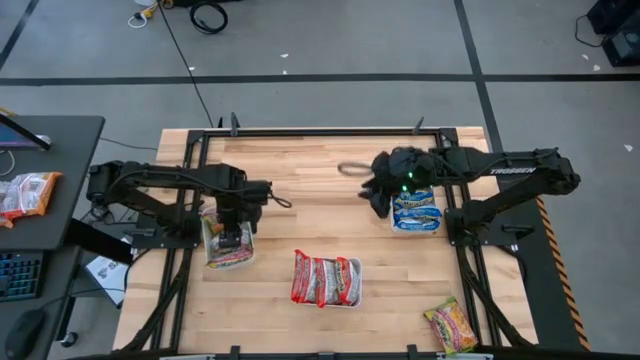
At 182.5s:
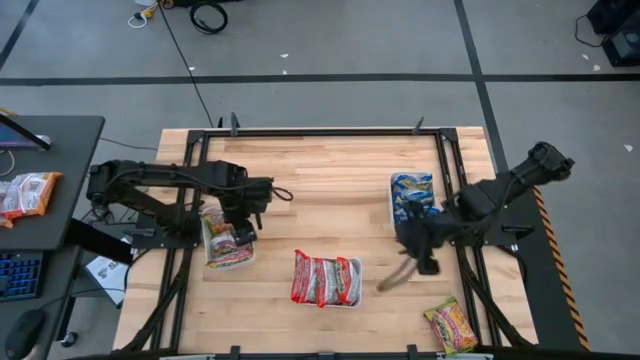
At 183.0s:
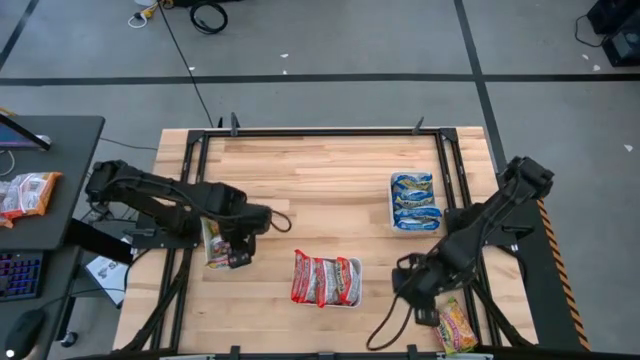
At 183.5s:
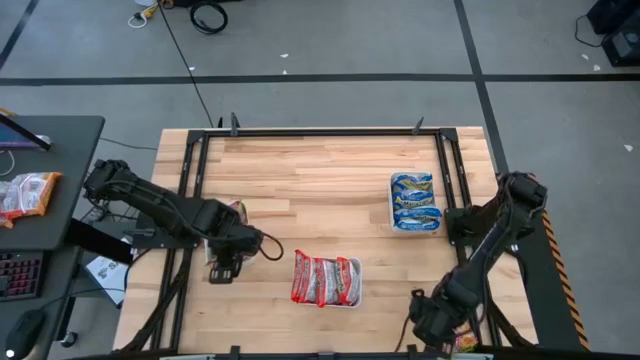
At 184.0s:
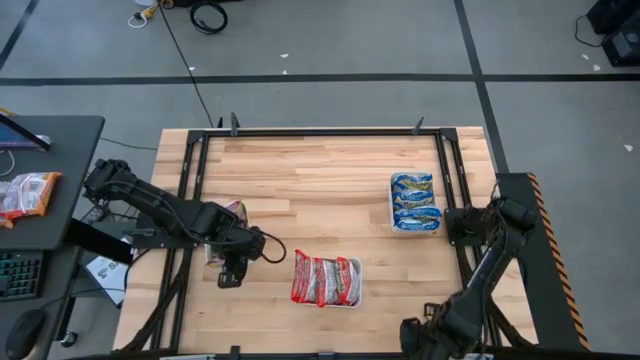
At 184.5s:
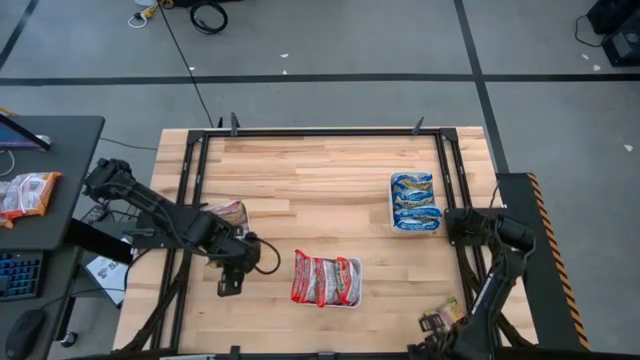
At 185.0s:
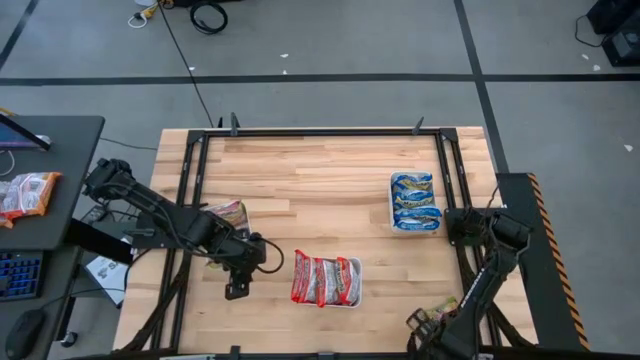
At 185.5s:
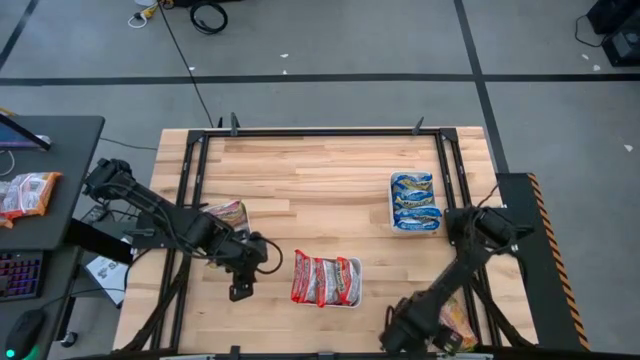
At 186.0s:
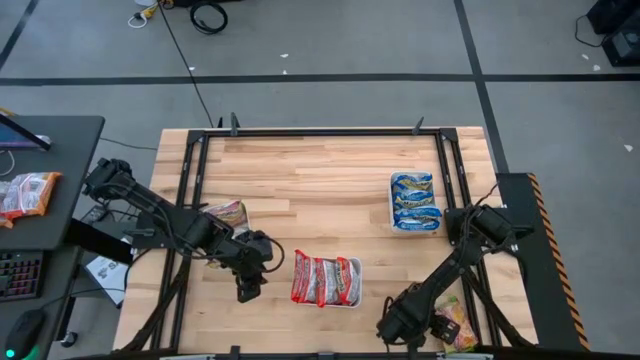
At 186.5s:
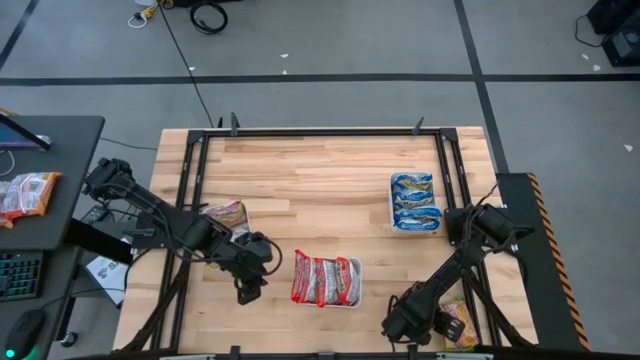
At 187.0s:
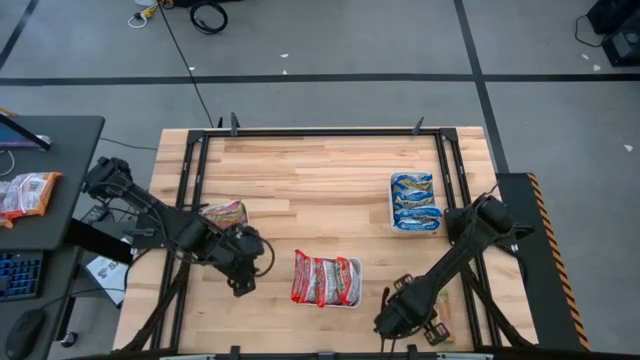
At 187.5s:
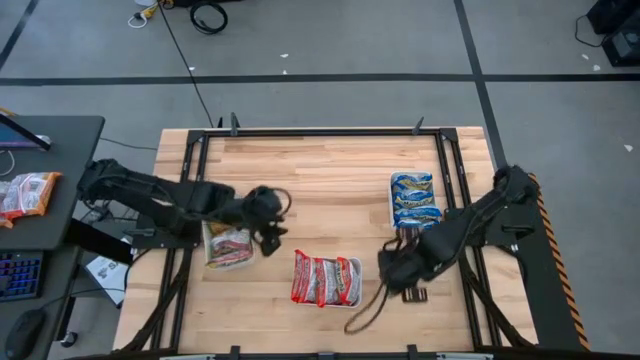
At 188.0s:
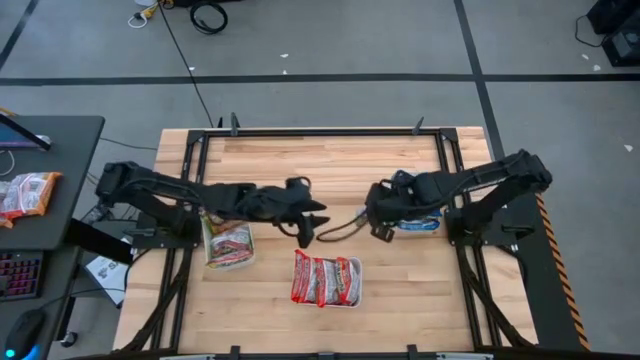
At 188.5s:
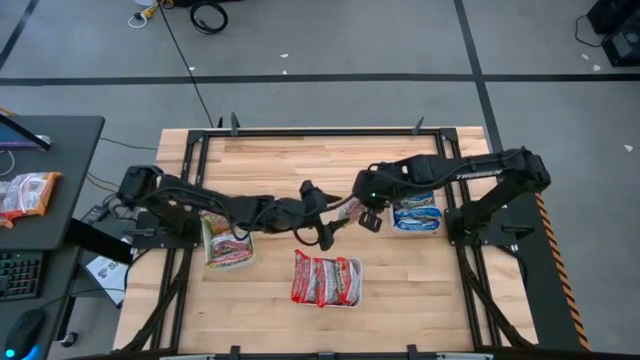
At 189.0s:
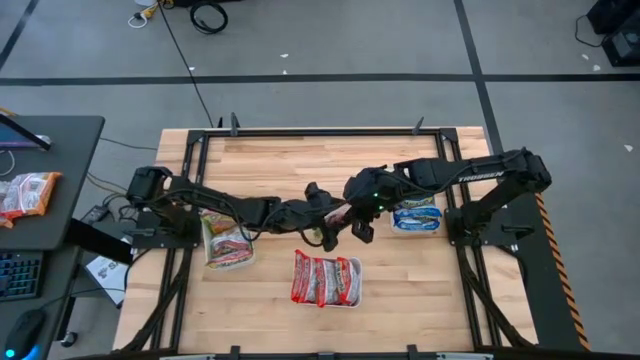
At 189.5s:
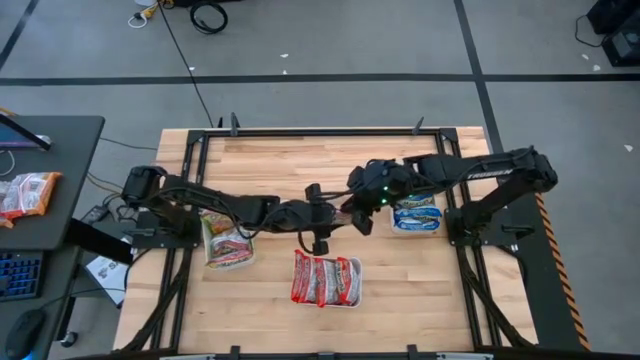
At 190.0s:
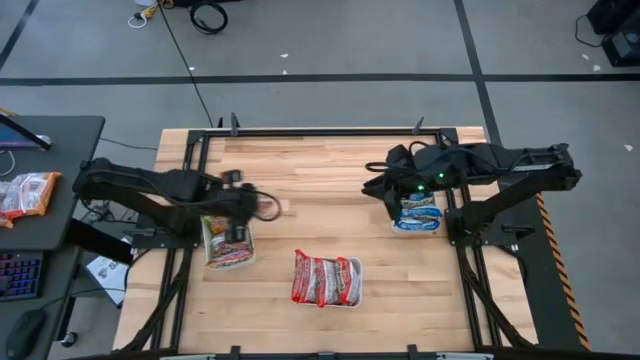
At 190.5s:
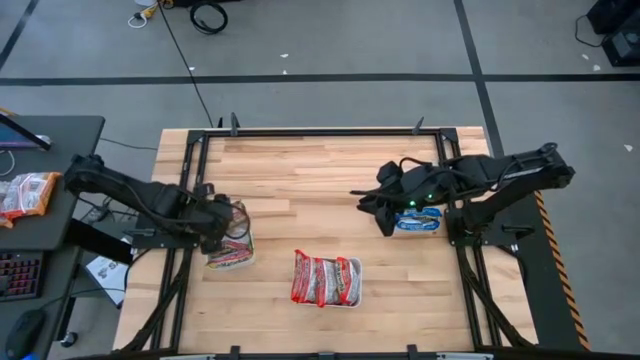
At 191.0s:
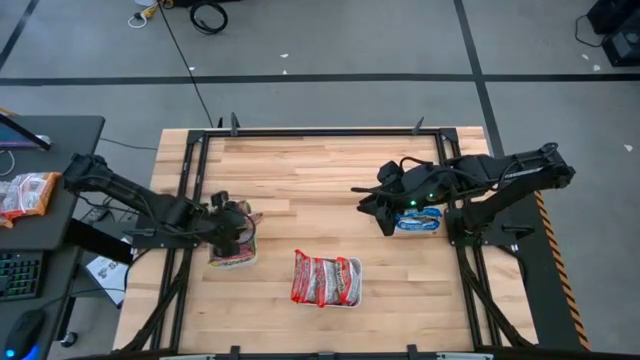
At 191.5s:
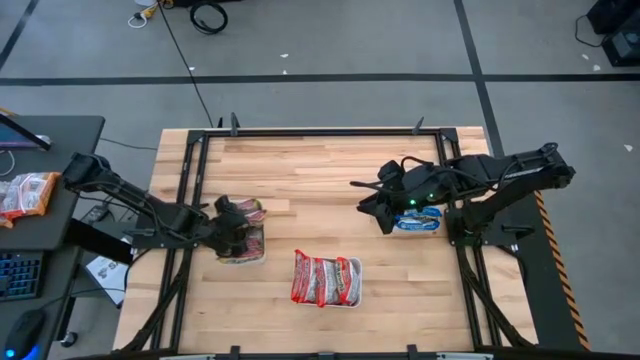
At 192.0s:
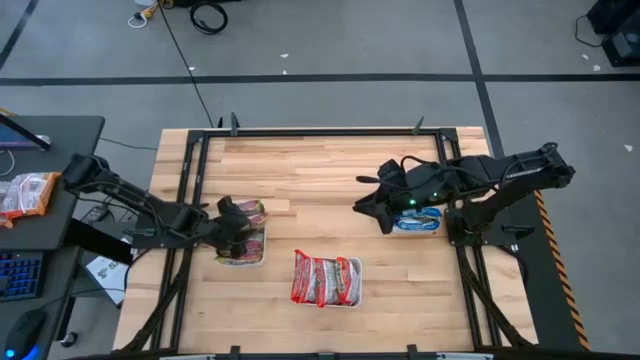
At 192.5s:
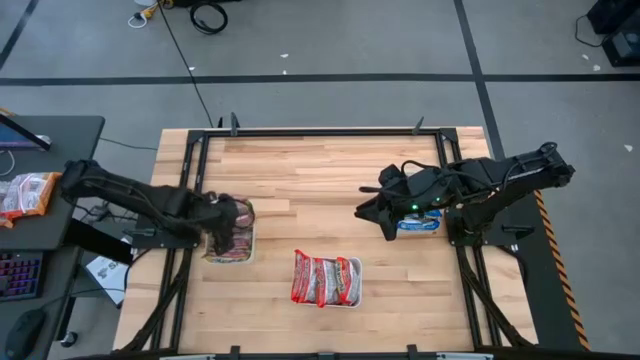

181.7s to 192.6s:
Task: Sort Maruchan noodles
Put the green noodle pack into the left white bin

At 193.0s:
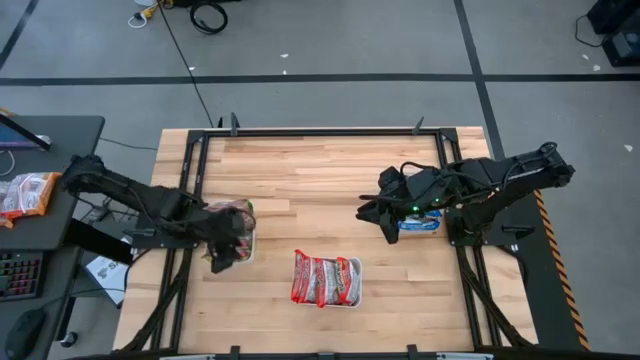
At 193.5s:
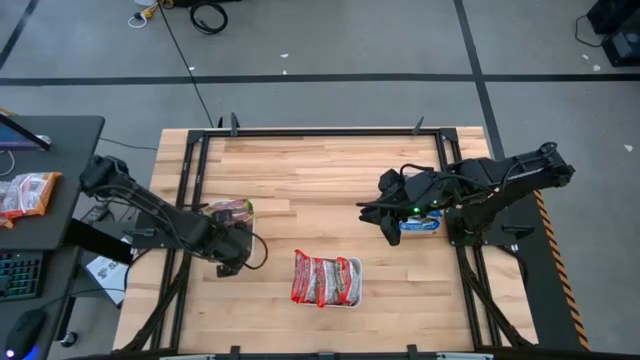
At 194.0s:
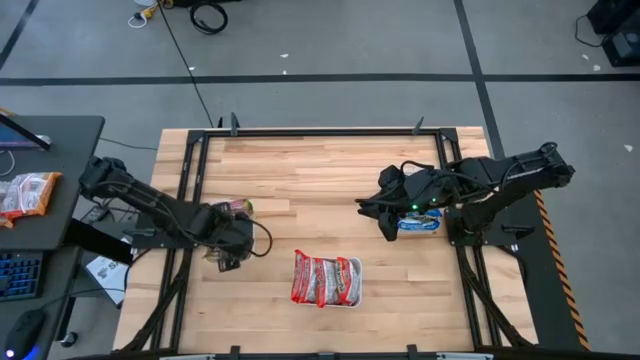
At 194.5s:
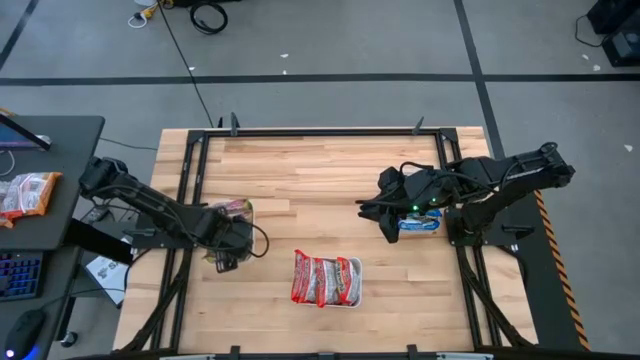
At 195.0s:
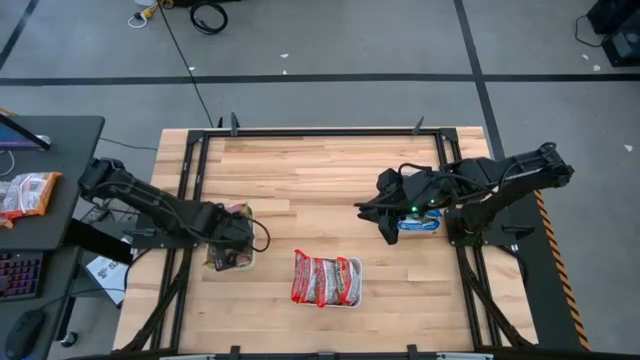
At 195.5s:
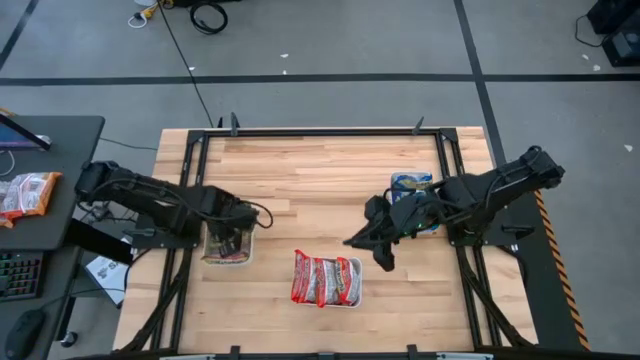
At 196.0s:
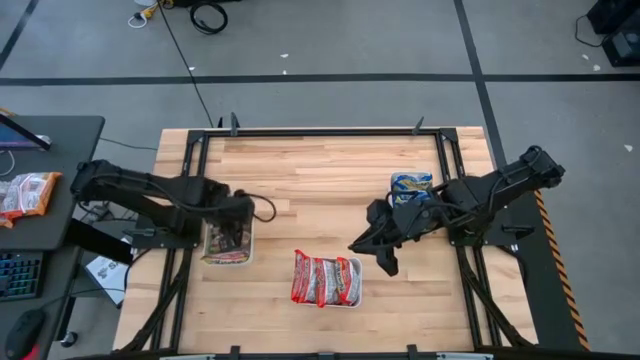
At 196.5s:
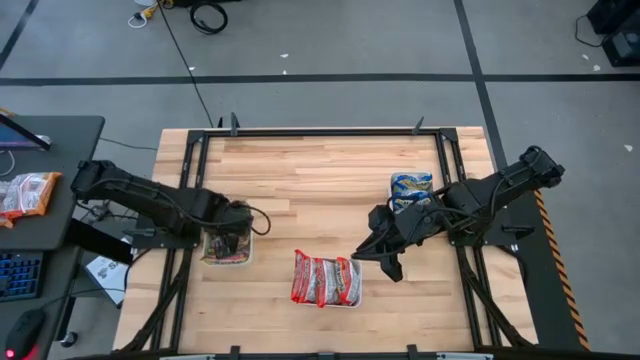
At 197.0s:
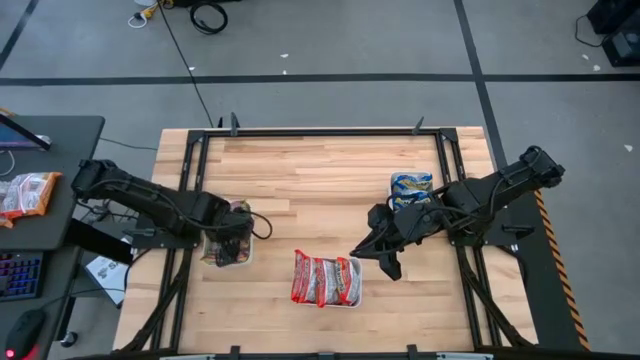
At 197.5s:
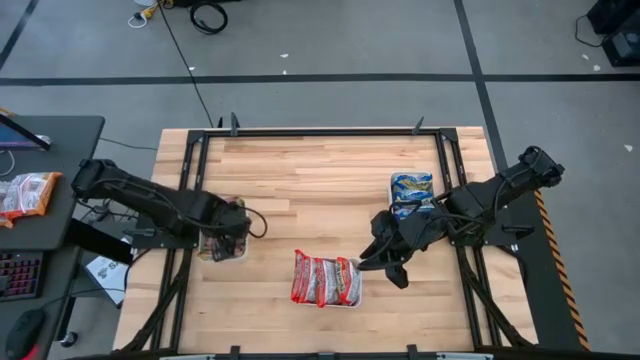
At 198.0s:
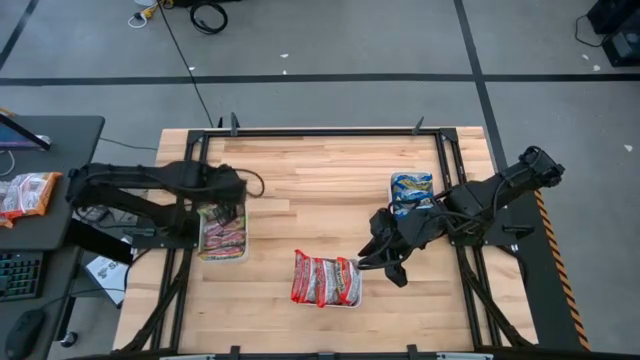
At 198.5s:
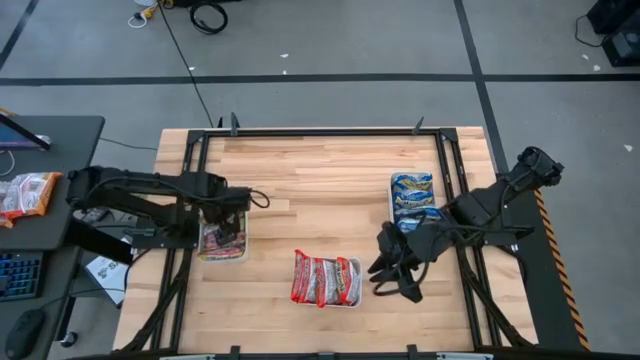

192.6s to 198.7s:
Adjust the green noodle packs in the left white bin

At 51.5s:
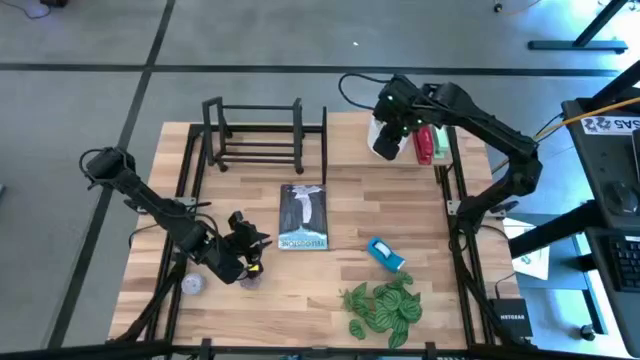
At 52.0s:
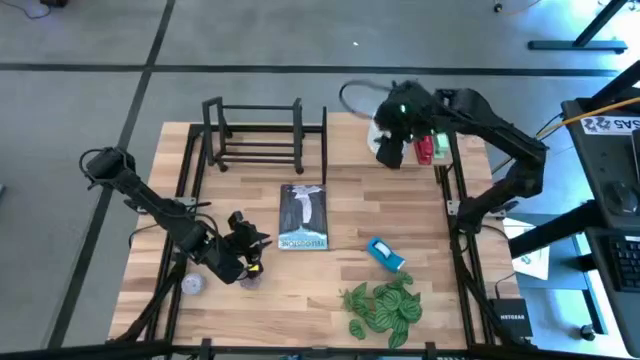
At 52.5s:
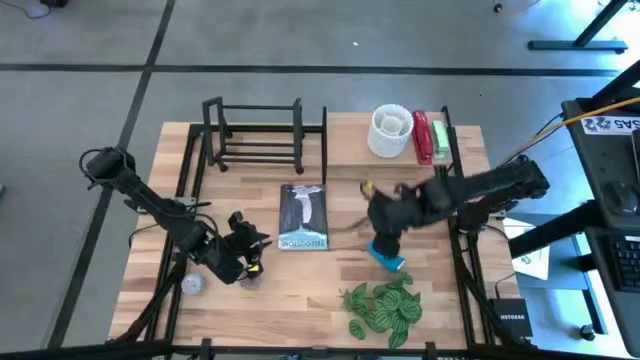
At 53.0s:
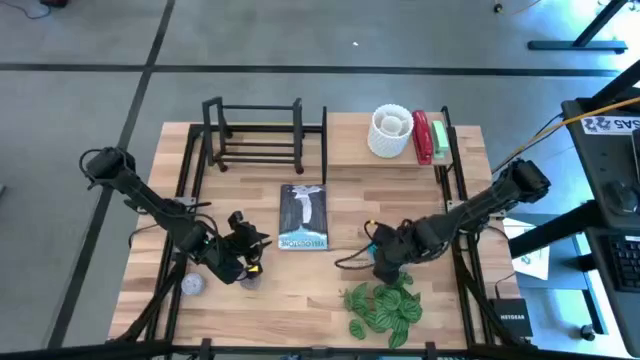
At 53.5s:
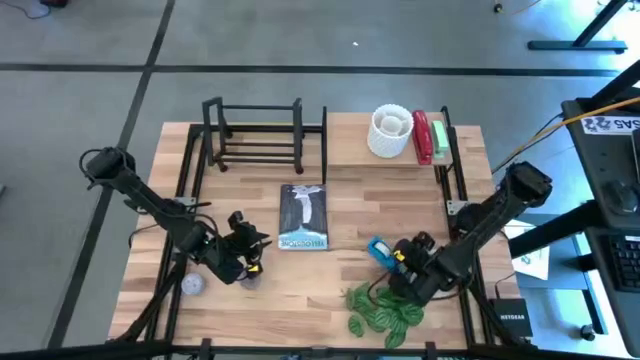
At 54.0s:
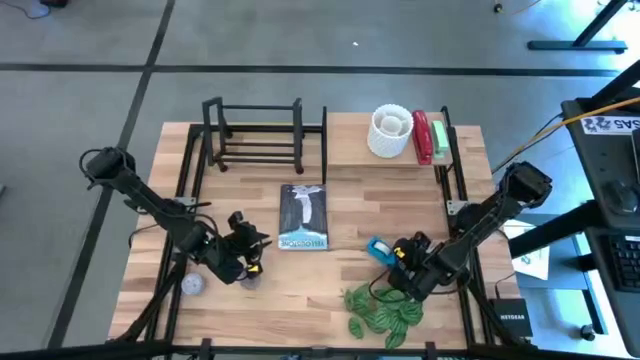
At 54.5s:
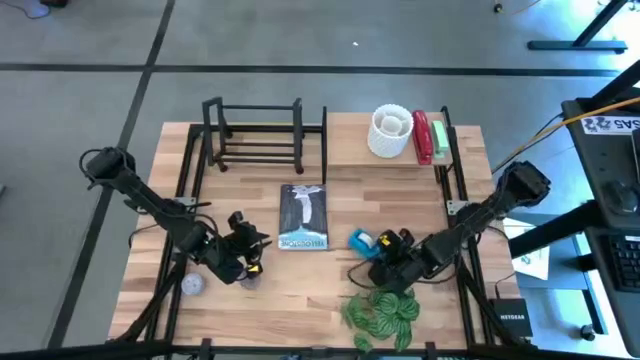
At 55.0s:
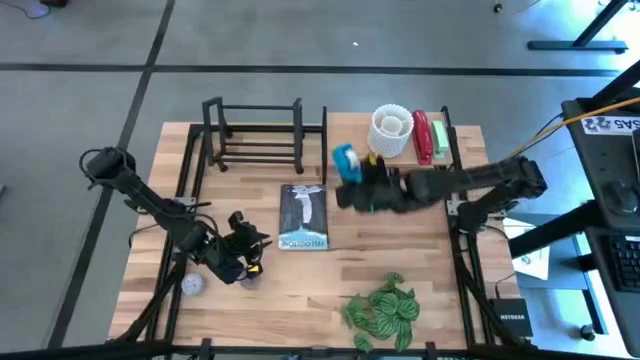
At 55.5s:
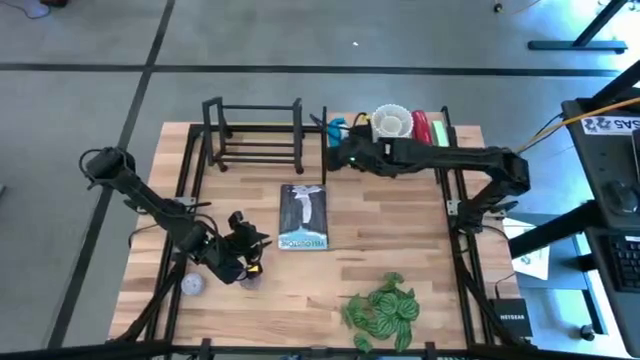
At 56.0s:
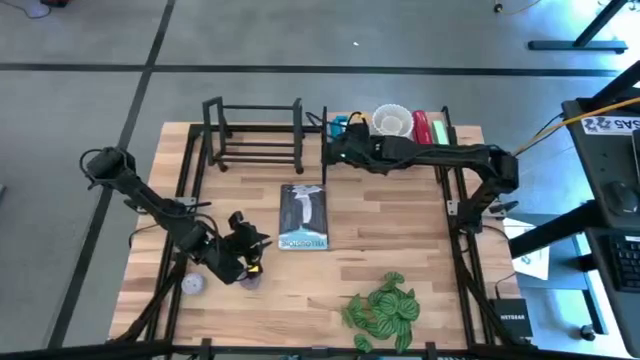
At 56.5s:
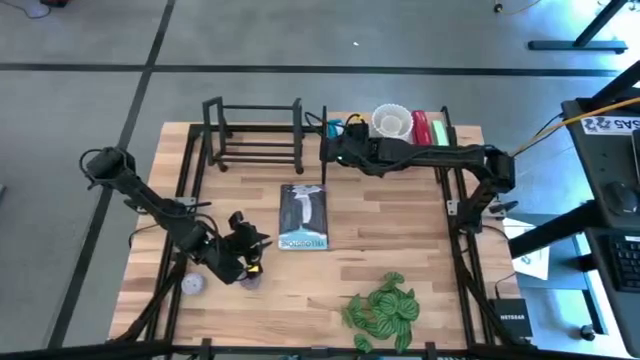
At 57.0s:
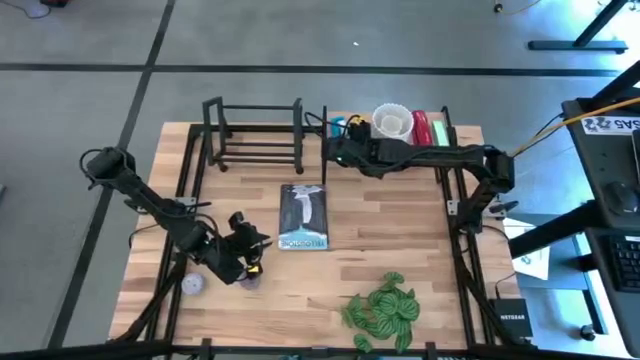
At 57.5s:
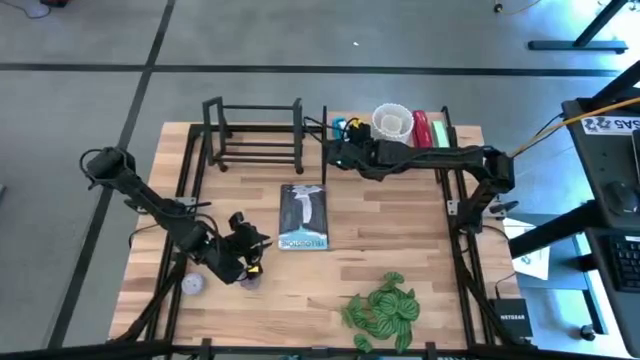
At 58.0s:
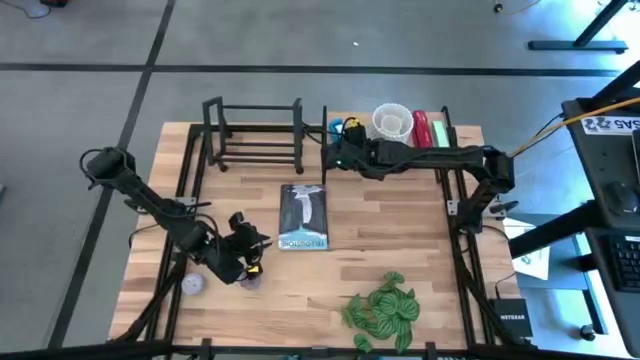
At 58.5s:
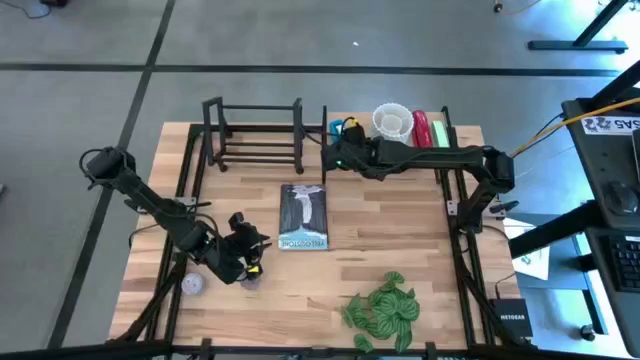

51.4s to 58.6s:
Task: Stock shelves
Put the blue tape dispenser on the shelf
